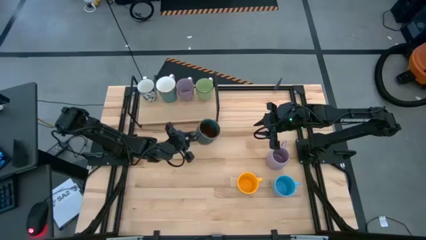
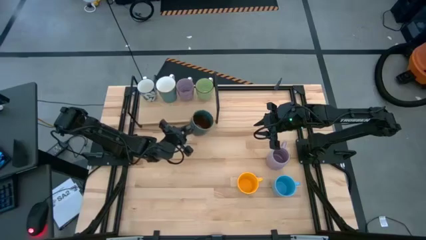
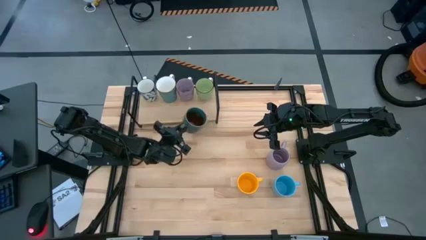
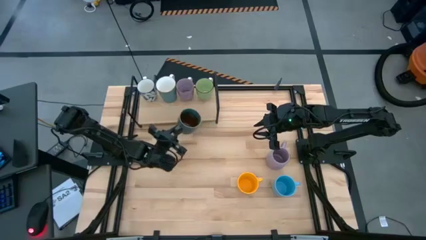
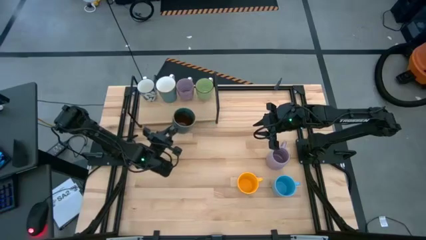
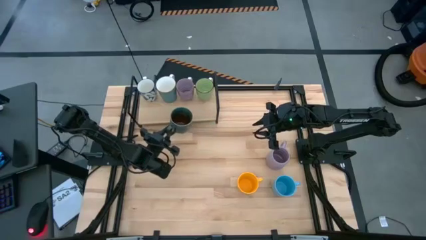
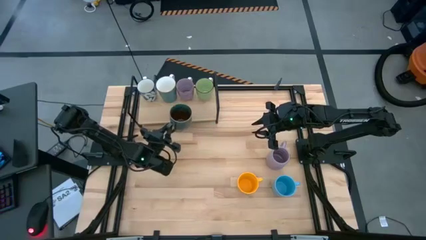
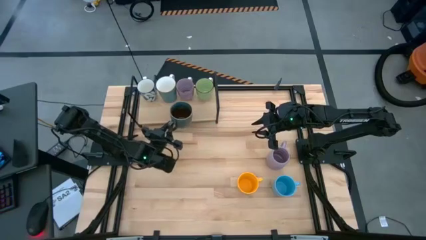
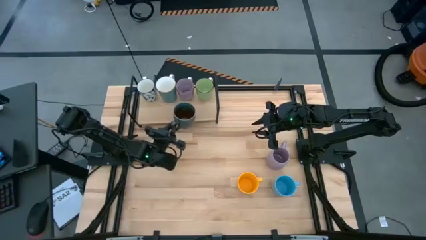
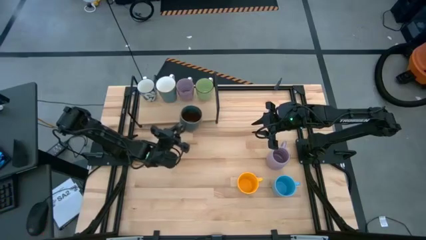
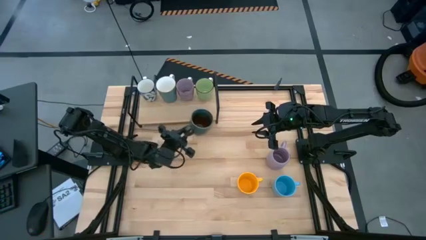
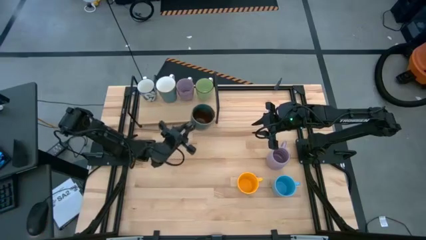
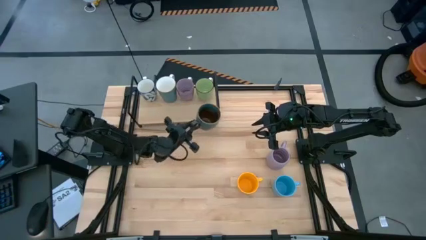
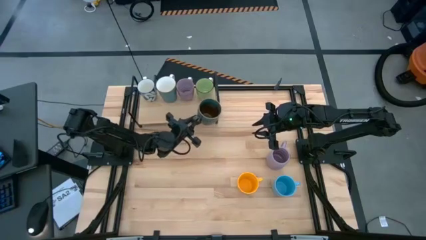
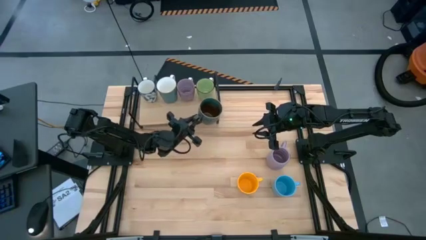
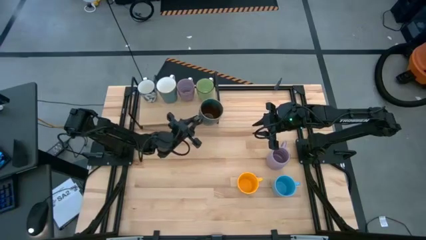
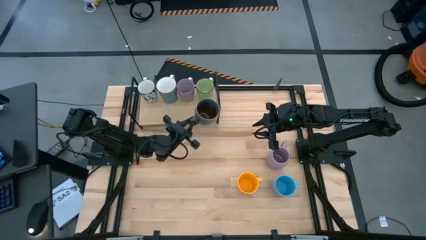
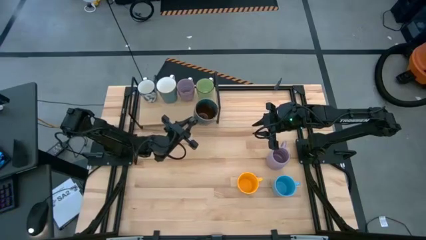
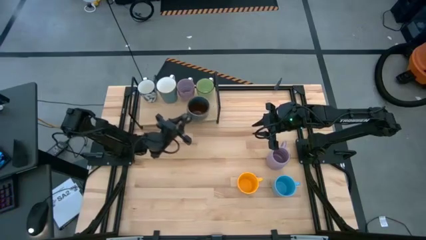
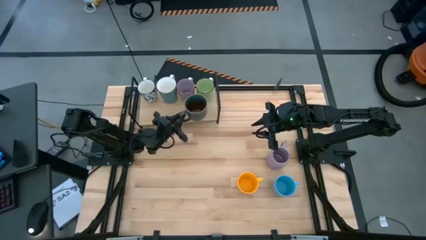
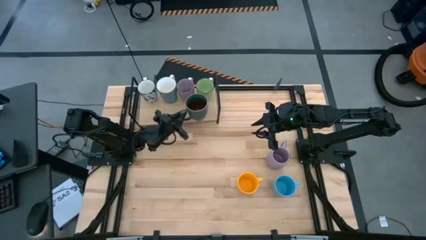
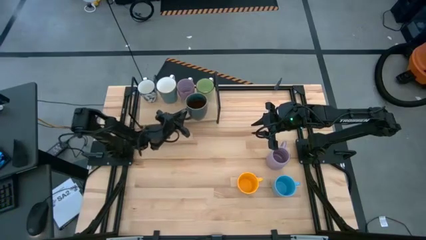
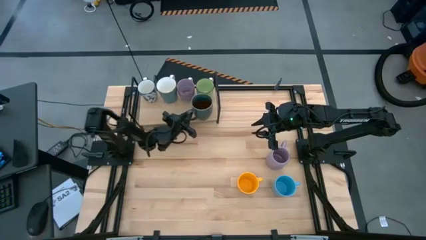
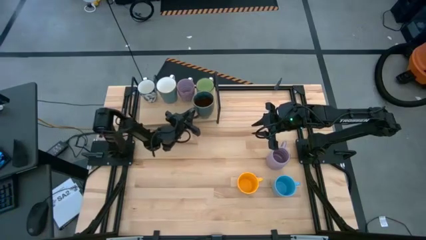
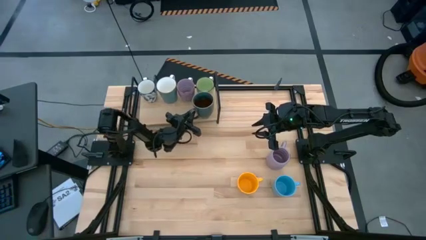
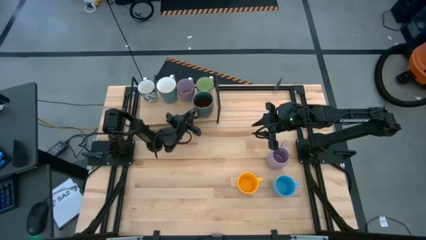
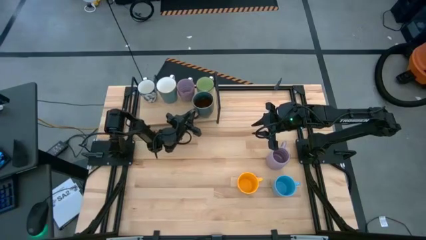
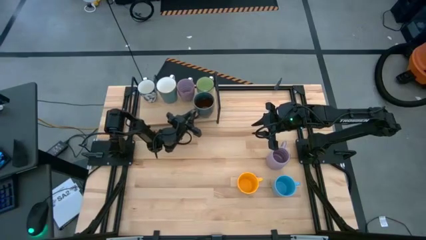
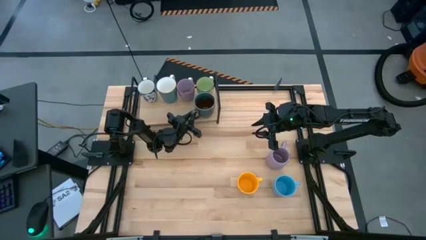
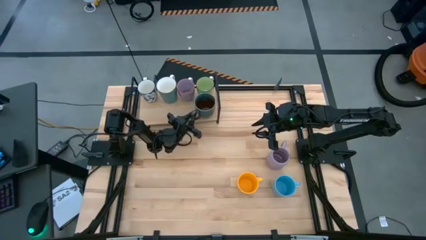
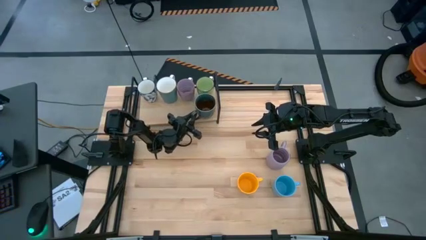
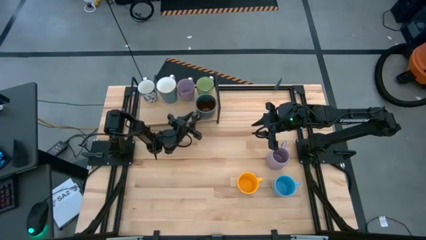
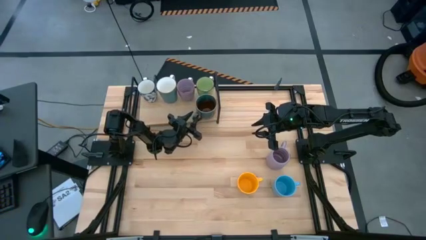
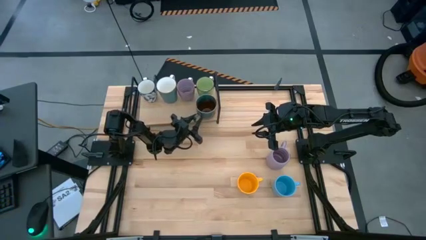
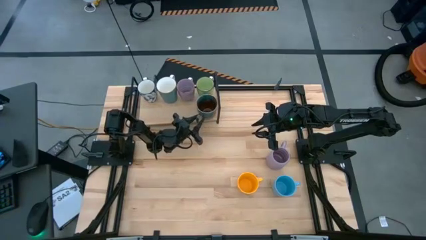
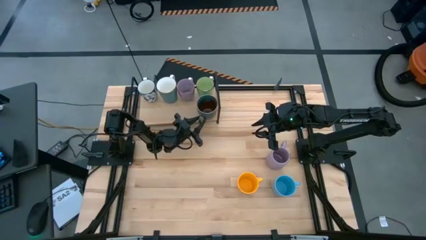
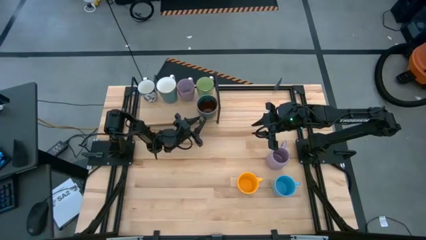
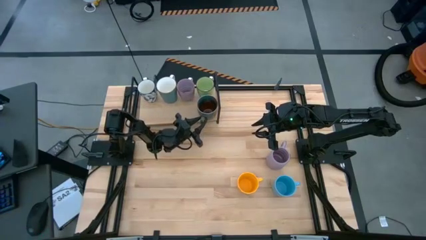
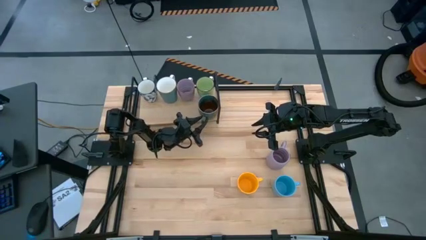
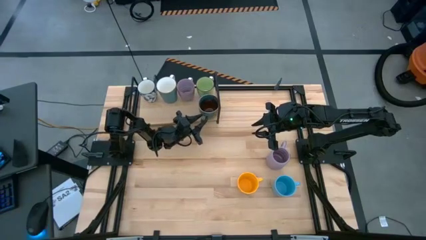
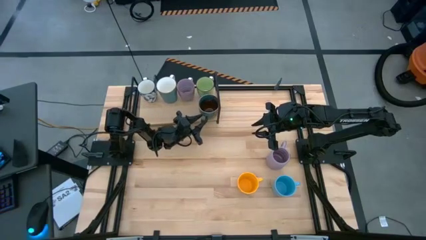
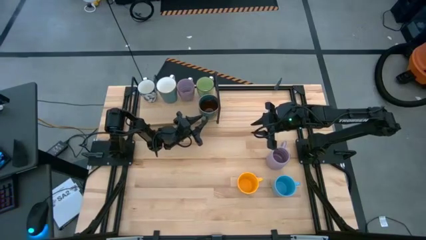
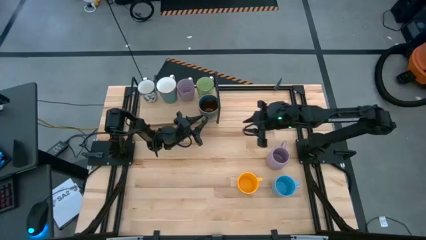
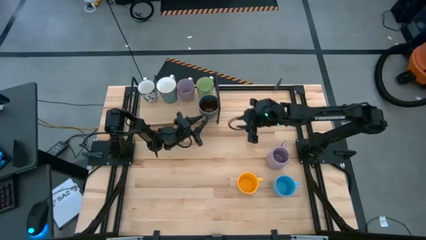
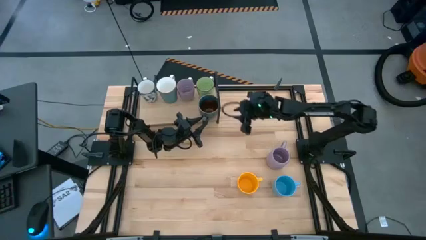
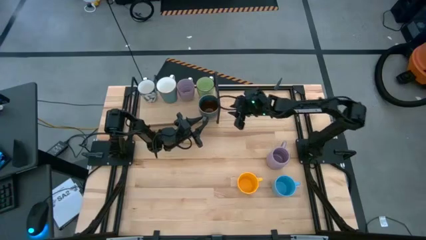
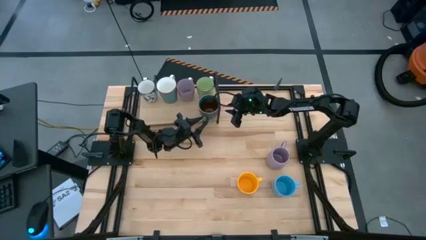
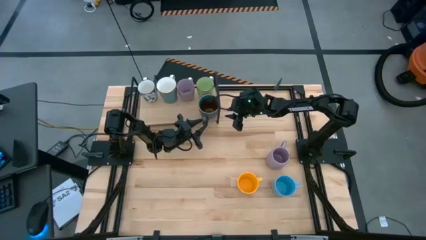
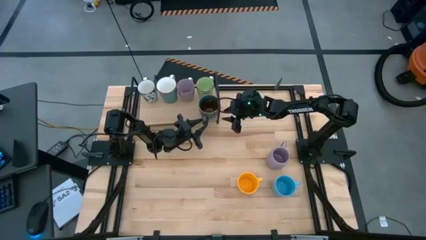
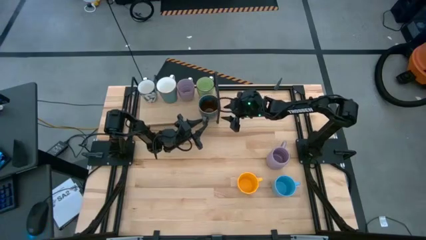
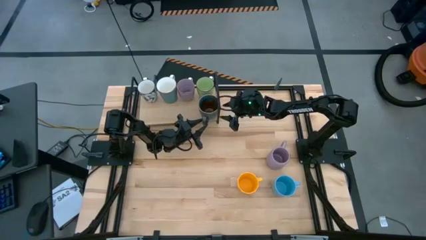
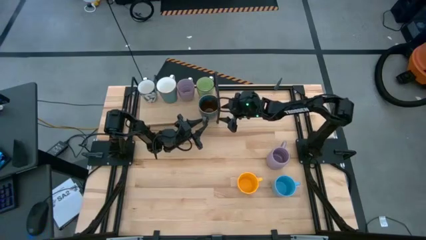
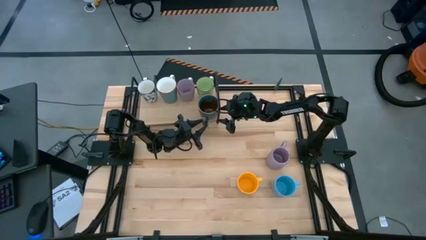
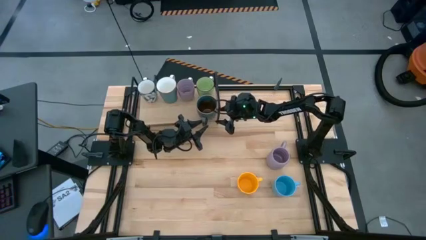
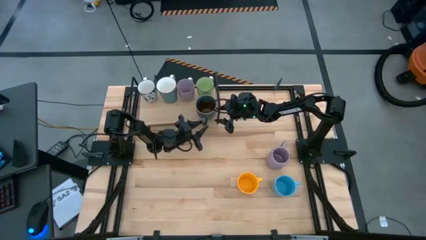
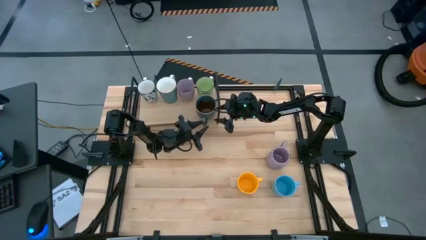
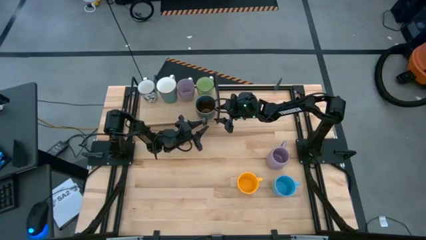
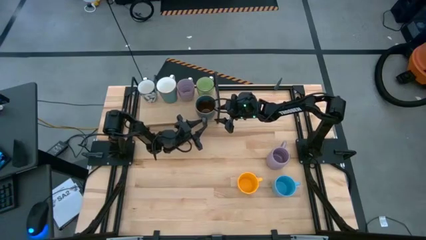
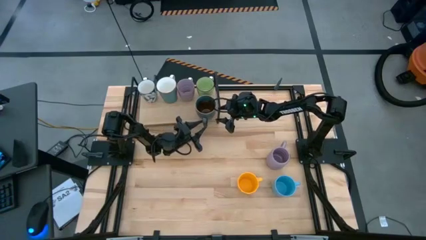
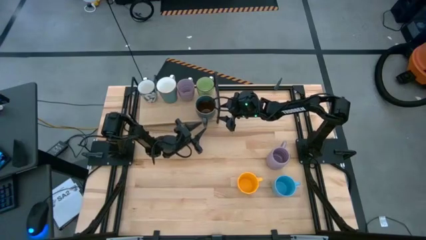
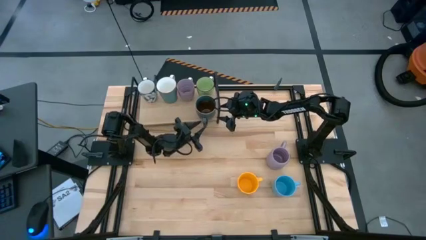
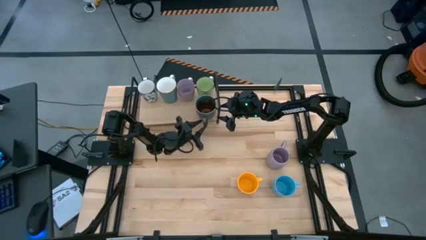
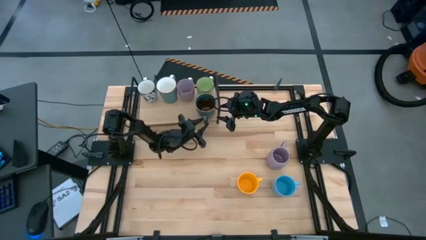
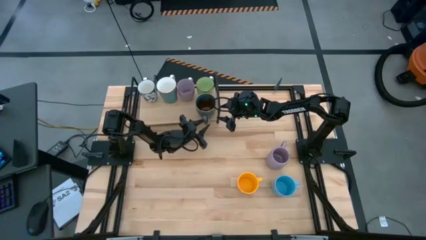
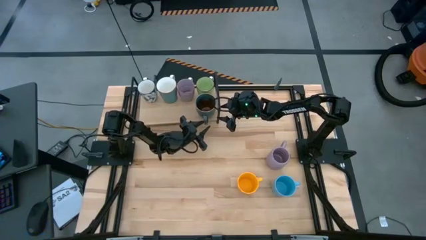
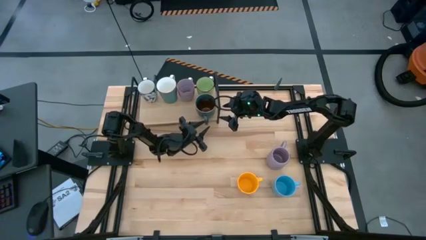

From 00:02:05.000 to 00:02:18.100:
Task: Place coffee mugs
Put the dark blue patterned mug on the shelf

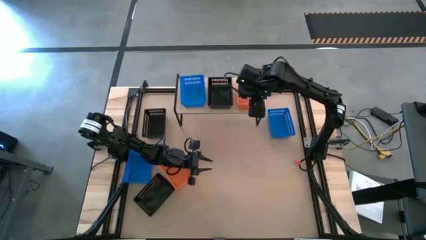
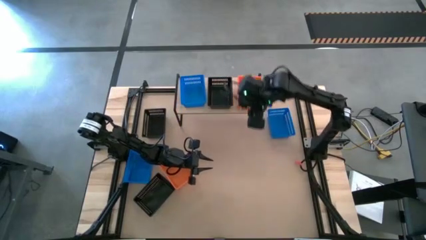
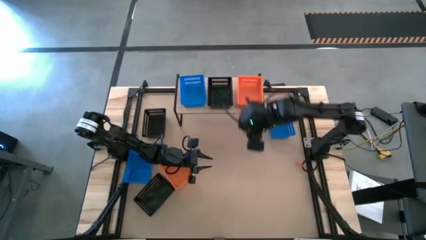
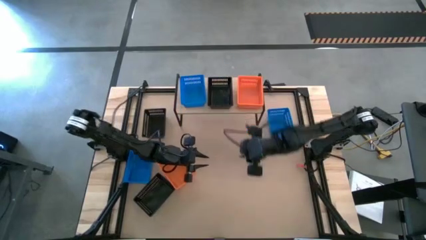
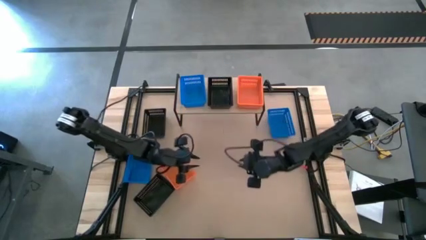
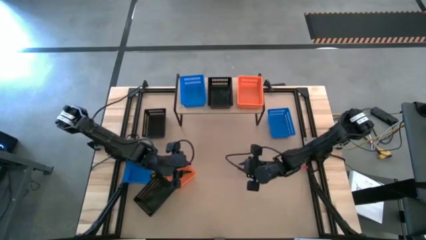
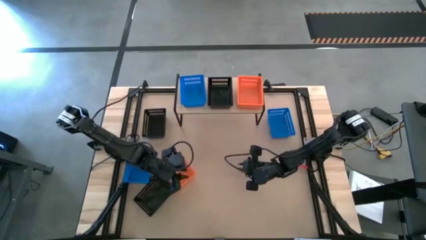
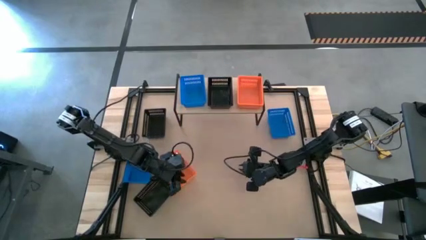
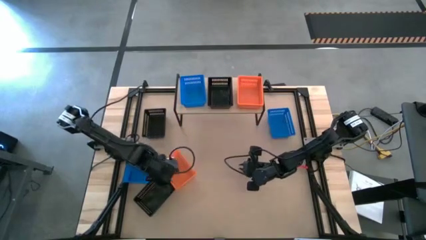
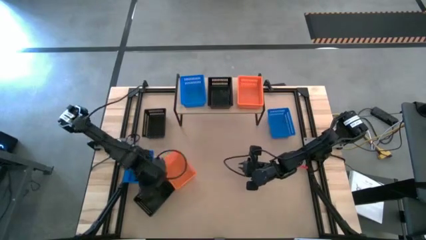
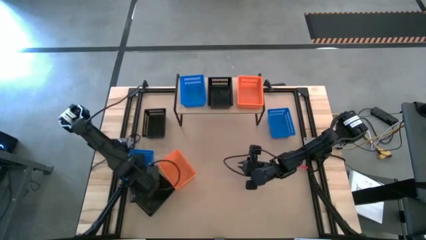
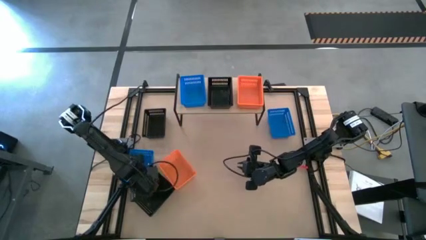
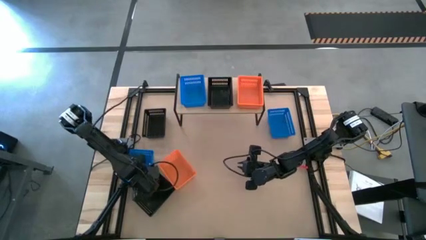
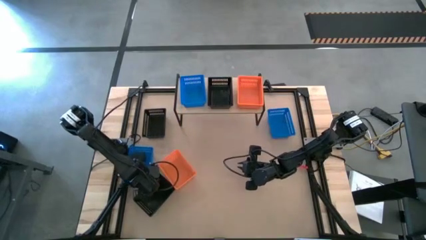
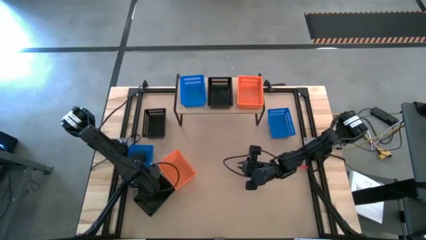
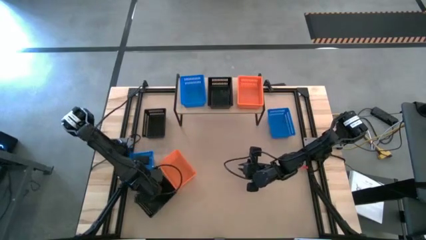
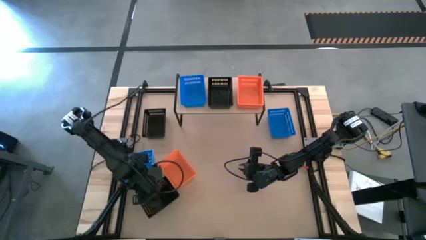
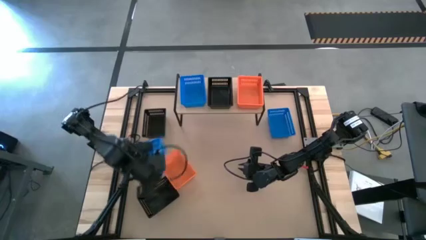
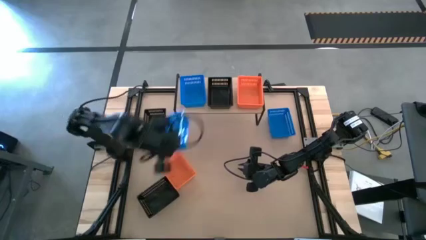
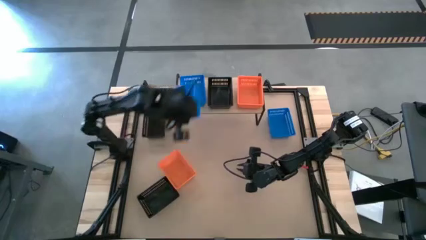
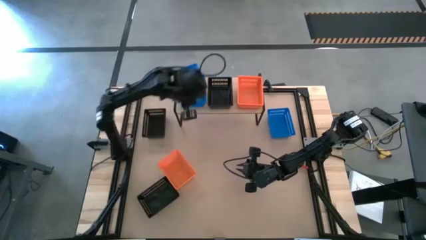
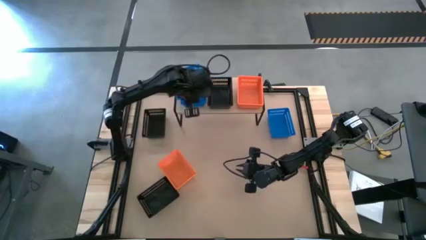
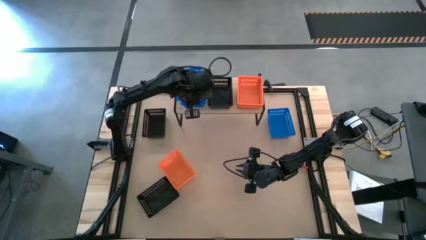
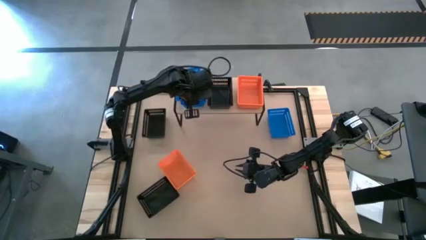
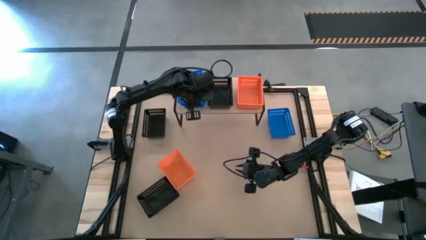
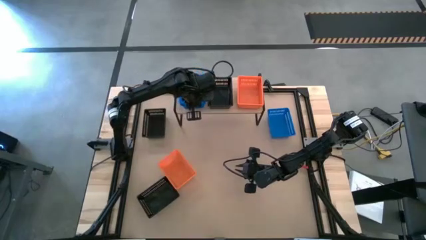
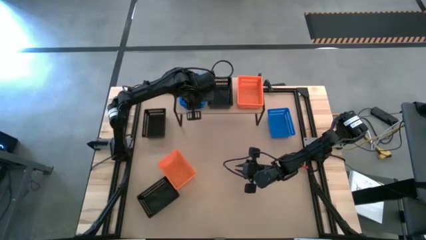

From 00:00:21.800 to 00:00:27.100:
Task: Stack baskets on shelf by color
Stack the left blue bin on top of the blue bin on the shelf
